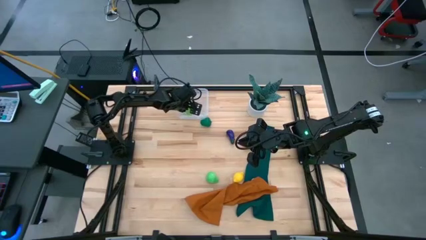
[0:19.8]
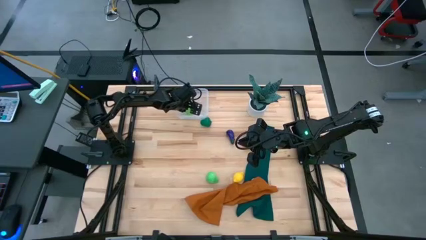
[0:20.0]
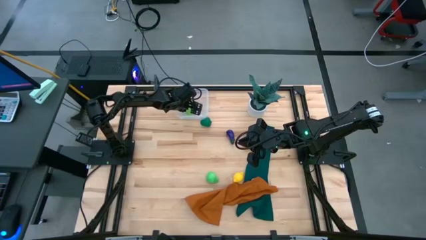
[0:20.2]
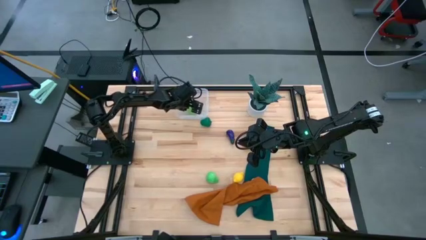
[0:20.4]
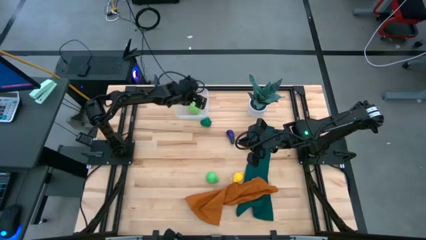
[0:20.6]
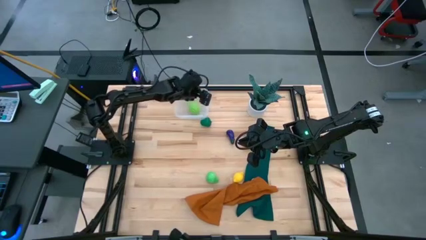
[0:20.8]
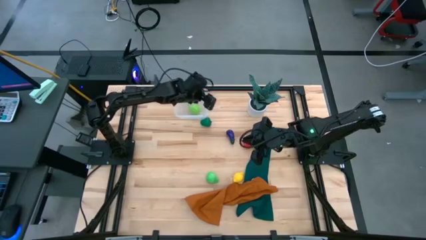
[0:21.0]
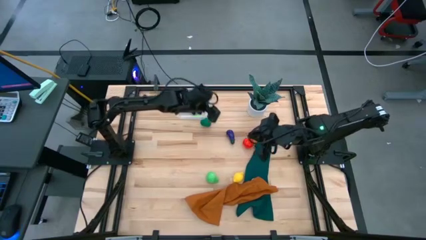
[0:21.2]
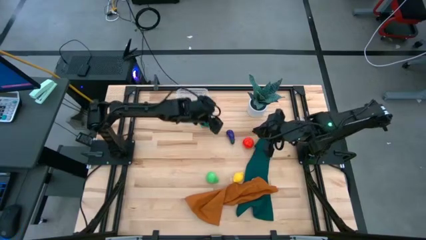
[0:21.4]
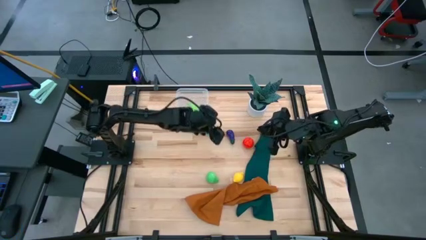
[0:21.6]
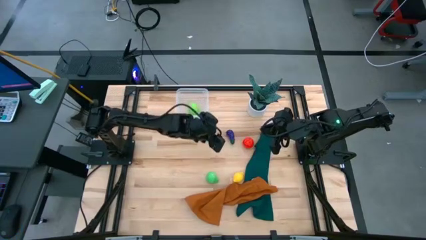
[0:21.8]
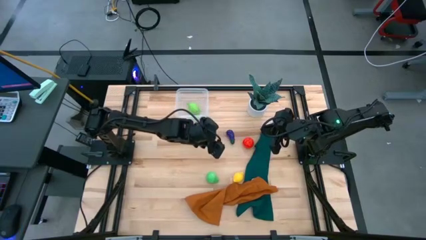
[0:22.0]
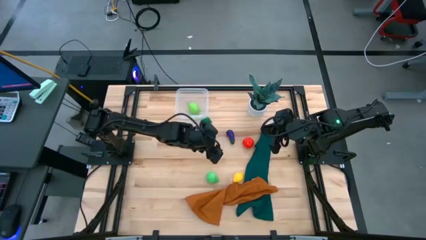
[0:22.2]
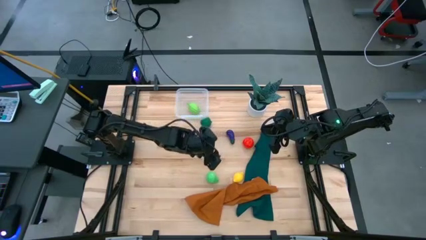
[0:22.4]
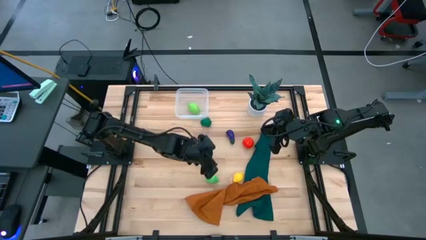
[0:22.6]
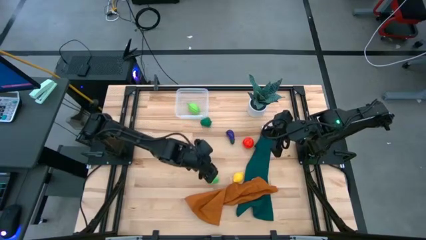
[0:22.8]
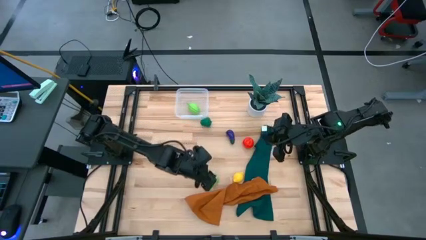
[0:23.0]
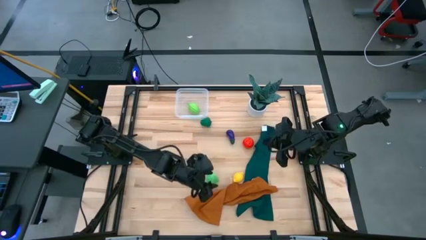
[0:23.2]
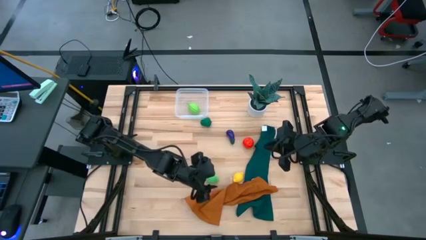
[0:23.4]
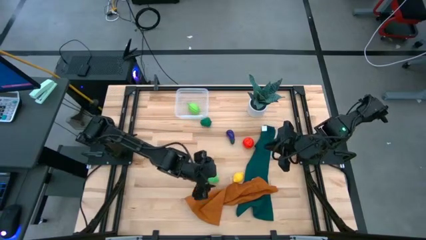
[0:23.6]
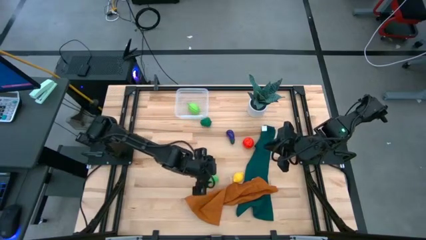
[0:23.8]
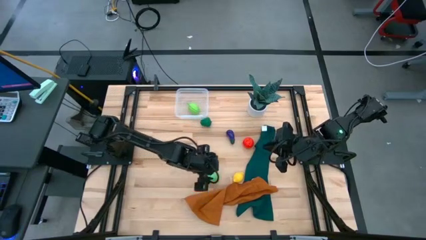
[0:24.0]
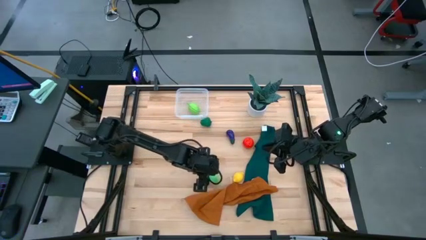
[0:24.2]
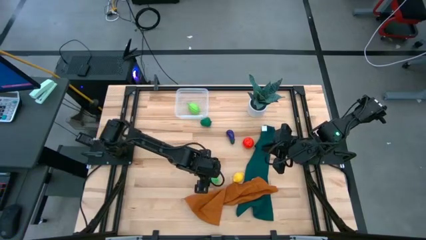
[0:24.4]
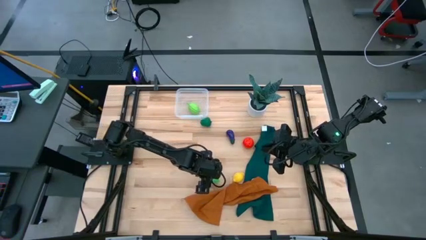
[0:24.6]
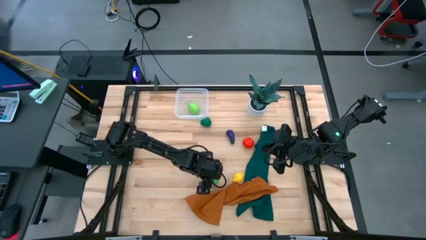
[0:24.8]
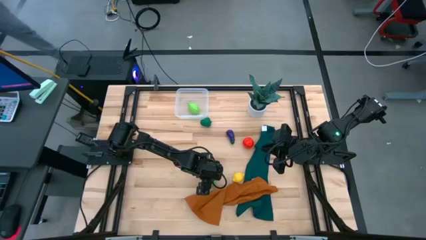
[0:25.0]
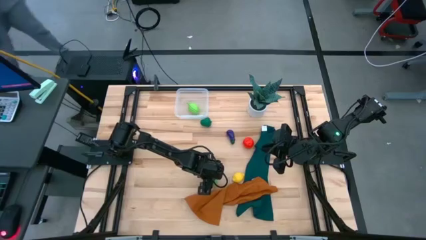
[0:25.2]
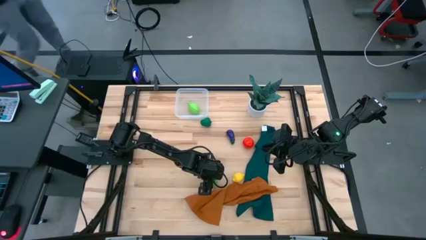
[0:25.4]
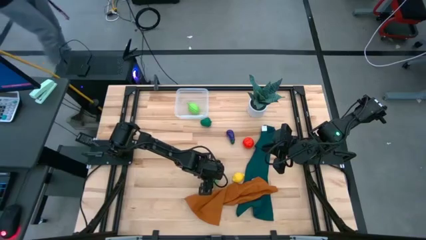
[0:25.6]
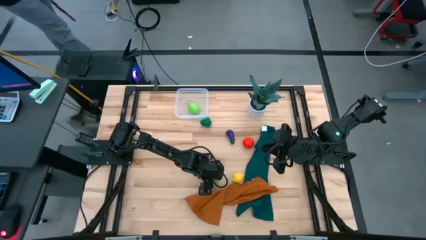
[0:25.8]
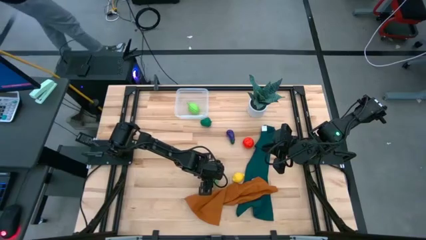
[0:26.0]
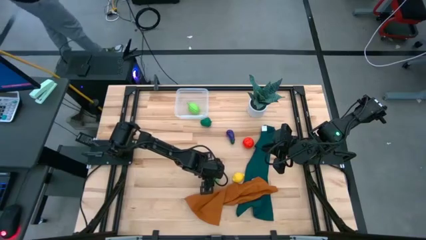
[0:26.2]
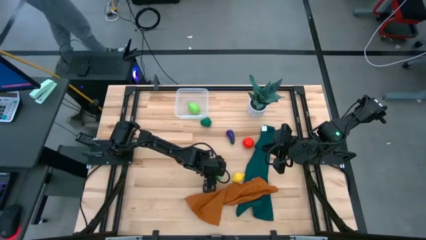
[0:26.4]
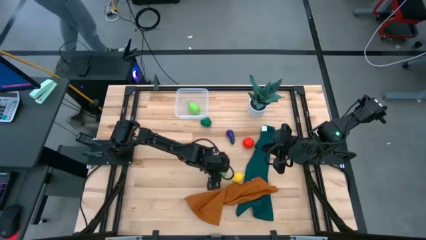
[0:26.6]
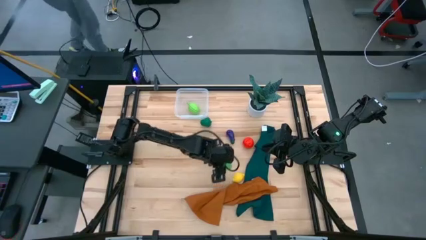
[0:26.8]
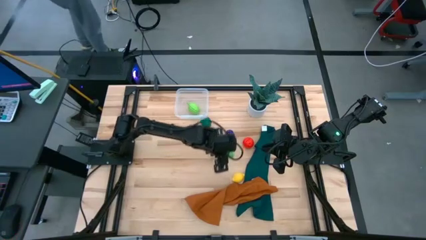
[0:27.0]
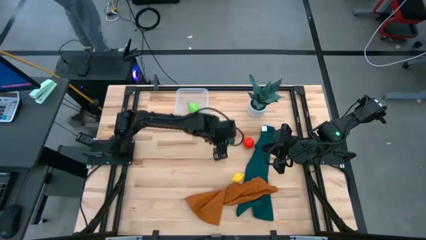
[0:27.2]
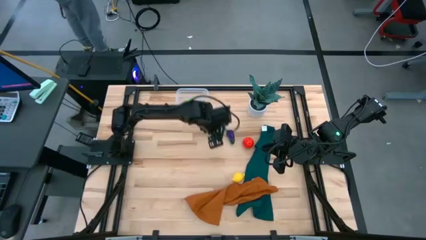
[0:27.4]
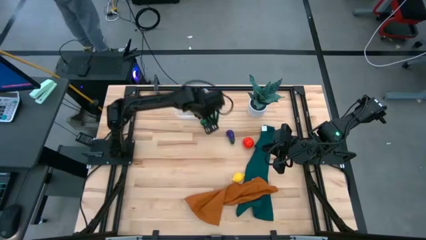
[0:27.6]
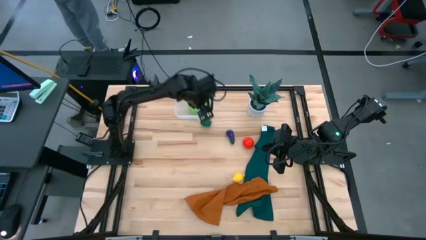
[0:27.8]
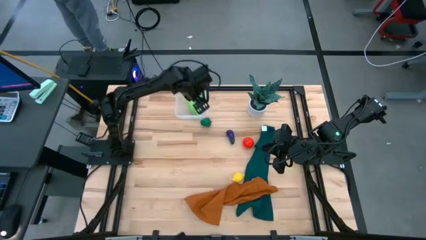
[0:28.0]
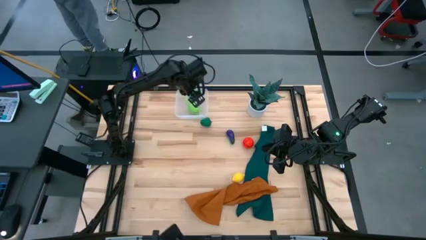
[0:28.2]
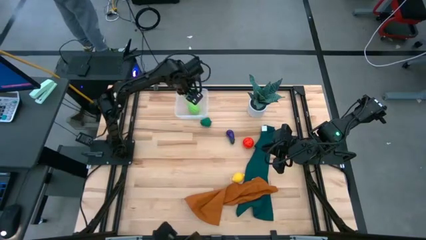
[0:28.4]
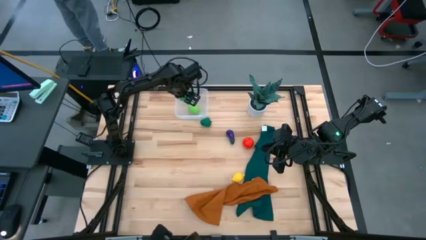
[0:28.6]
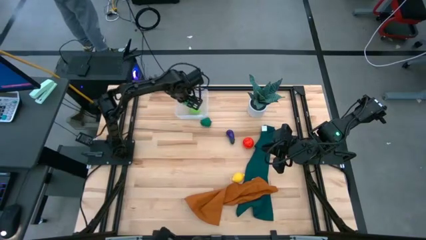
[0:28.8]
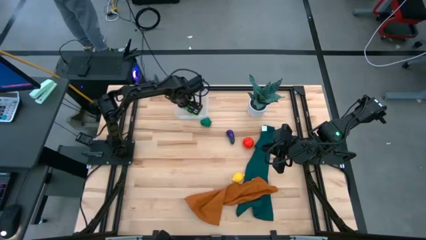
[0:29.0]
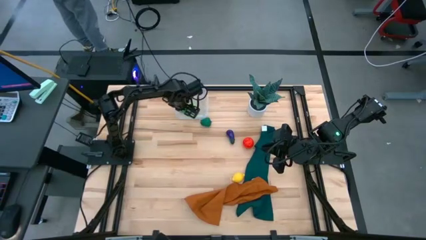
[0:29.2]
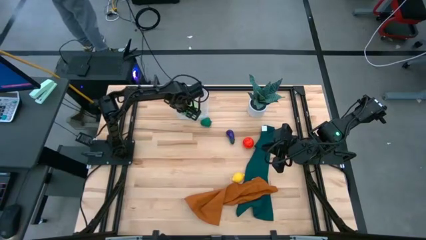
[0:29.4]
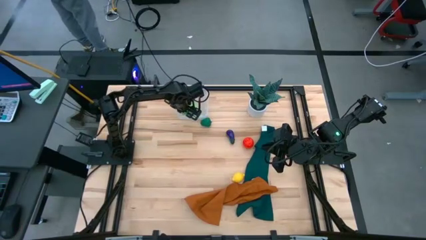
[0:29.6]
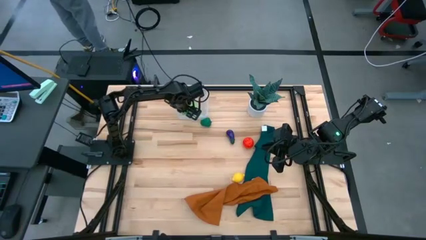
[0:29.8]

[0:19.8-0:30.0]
Task: Pick and placing Produce into tupperware
Put the green pear into the transparent bin

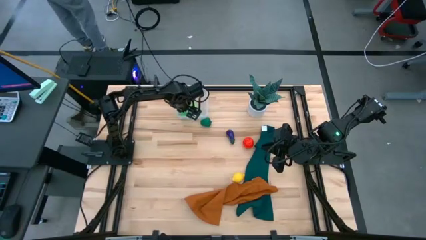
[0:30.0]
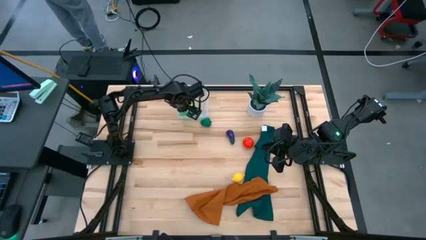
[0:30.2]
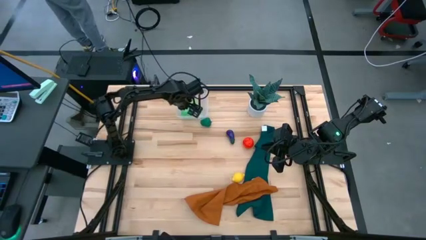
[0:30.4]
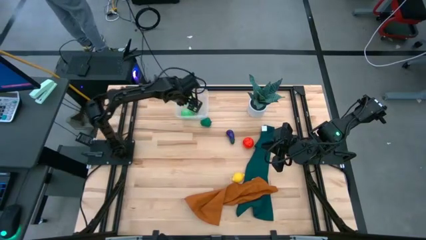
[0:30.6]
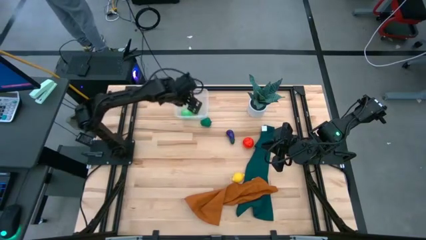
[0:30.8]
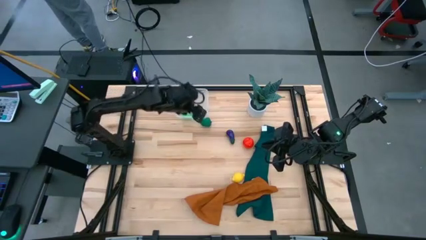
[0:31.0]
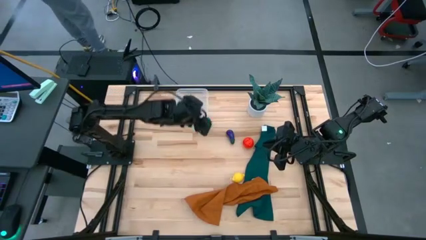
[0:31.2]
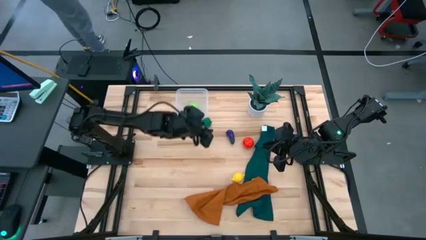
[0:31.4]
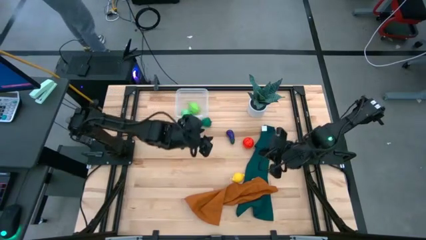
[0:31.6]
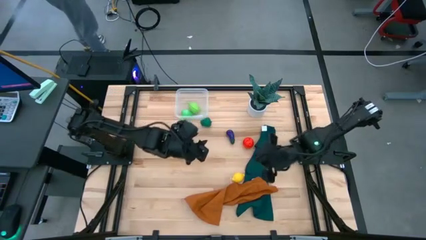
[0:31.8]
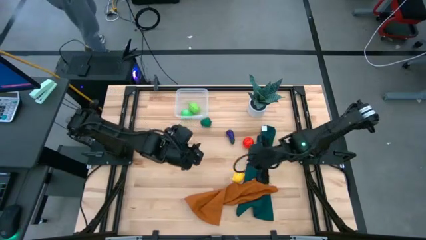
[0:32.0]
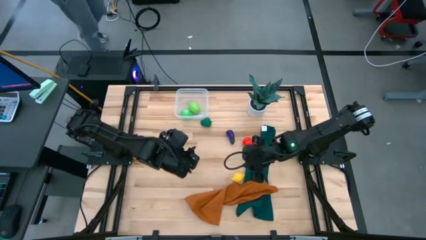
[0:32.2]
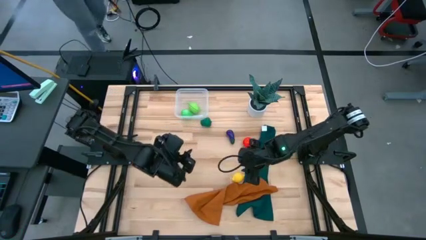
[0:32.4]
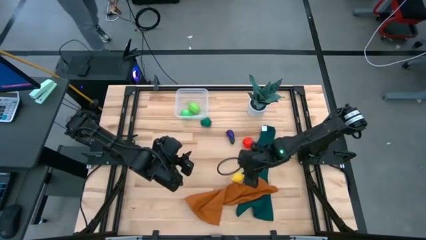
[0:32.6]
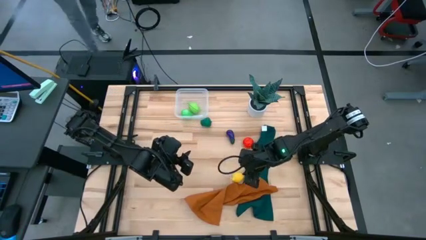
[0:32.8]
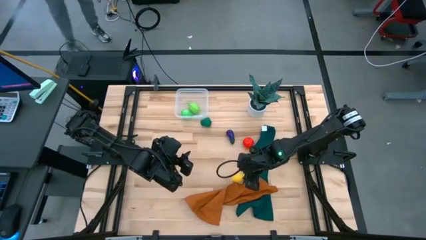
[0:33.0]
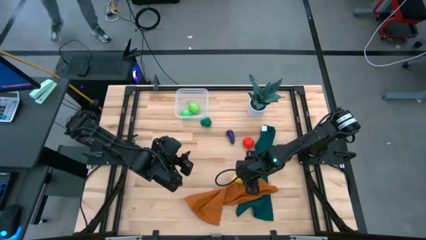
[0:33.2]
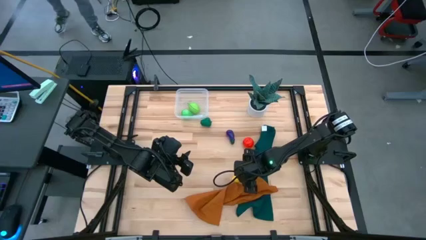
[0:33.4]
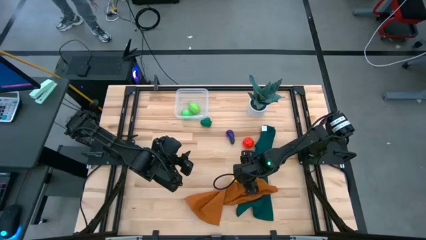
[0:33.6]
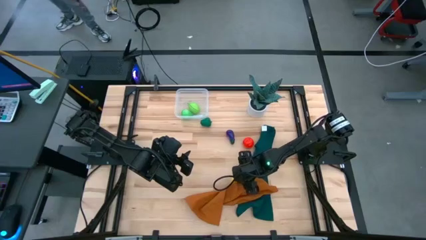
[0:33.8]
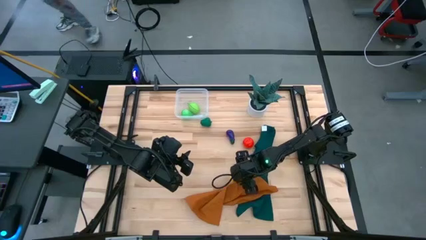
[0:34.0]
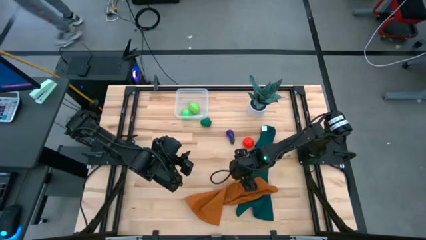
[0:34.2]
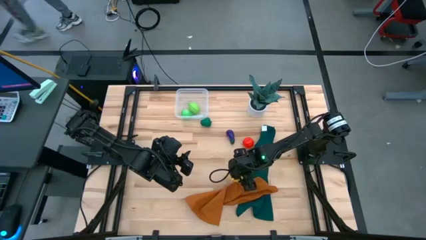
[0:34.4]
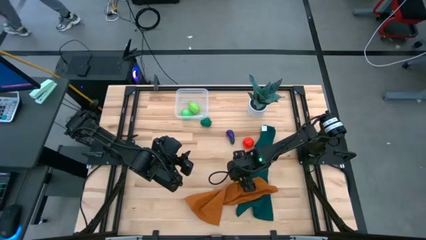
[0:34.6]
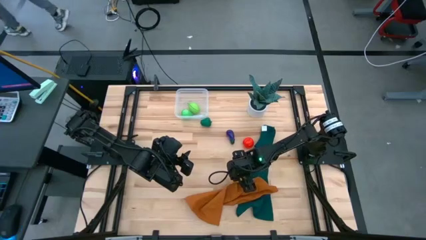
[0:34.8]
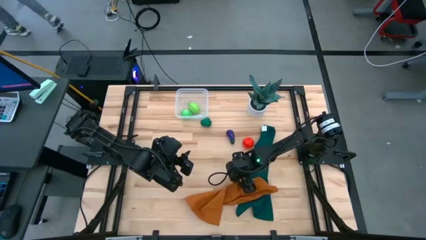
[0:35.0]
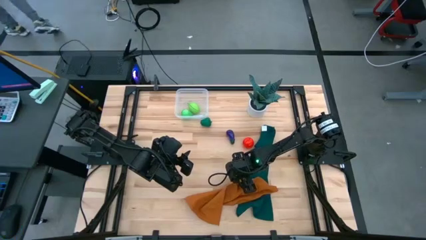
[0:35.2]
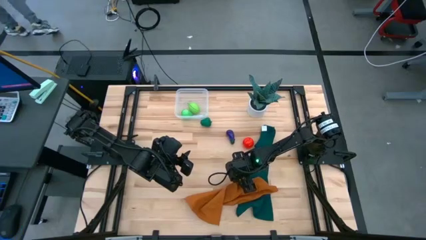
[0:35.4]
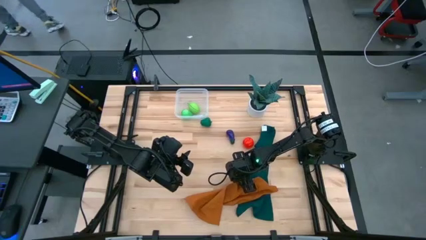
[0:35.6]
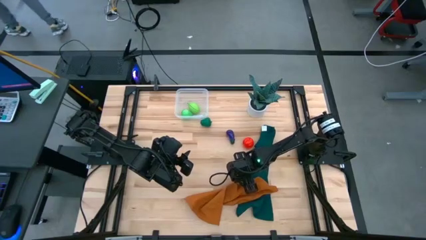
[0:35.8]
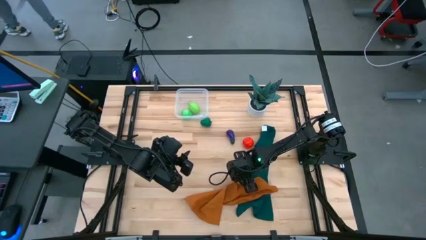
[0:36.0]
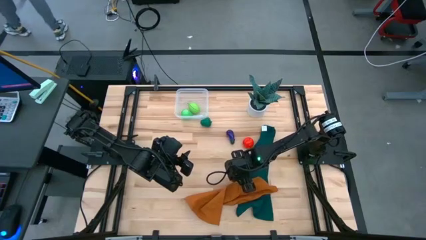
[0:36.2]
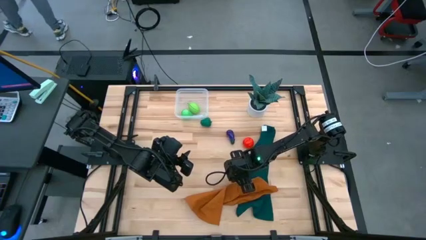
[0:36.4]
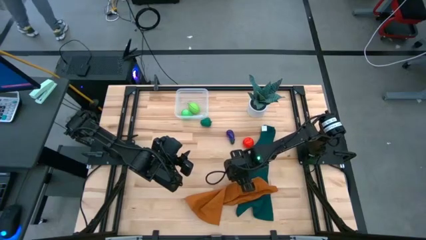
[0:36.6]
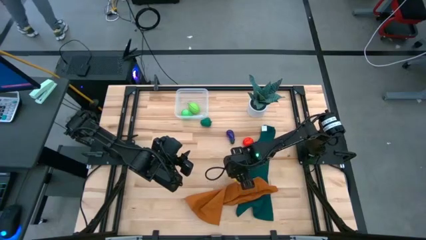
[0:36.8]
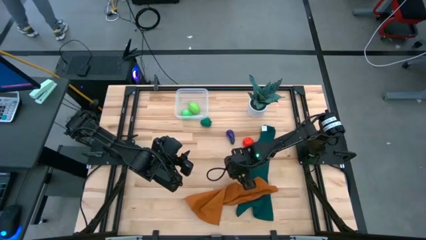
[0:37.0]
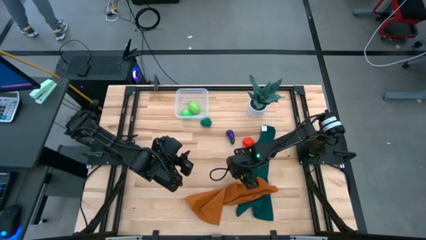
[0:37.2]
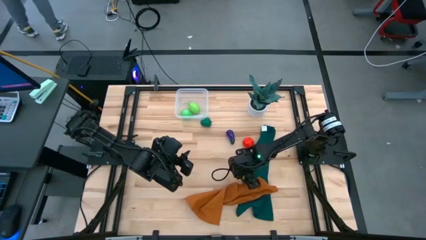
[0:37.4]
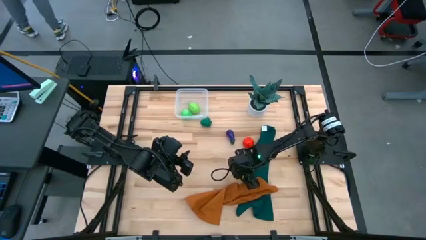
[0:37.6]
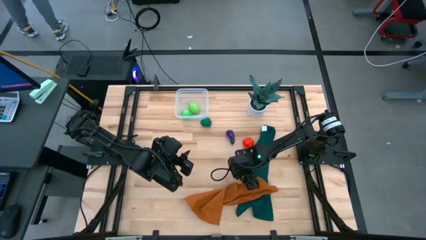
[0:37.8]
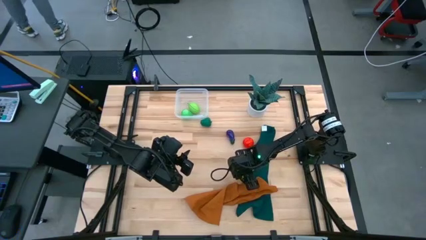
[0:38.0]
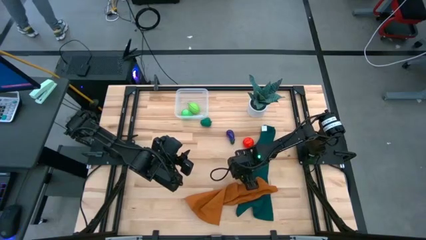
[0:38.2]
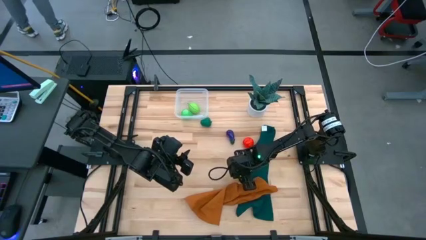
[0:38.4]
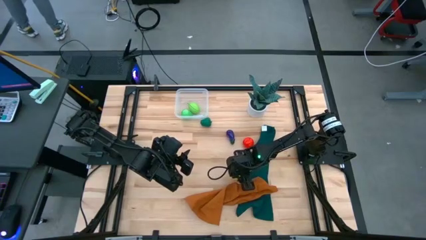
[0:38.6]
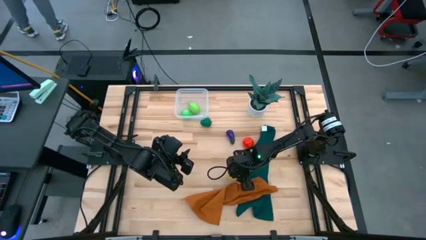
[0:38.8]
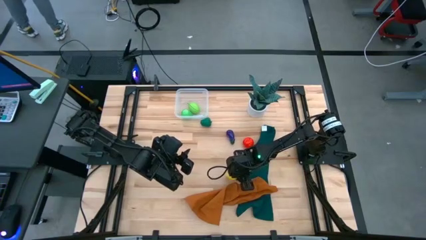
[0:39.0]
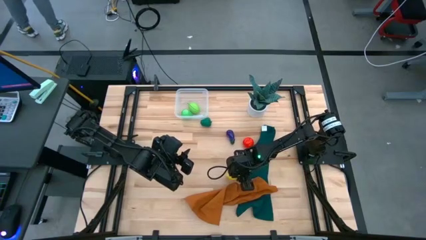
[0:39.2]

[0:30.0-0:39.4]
Put the yellow lemon into the transparent bin
